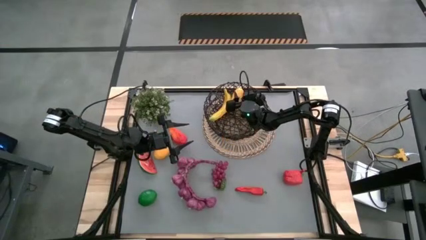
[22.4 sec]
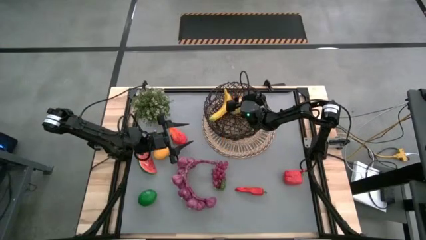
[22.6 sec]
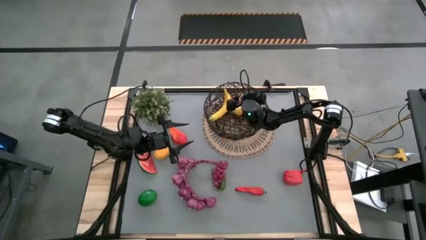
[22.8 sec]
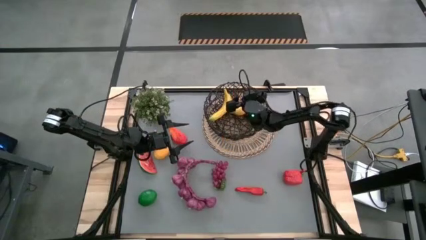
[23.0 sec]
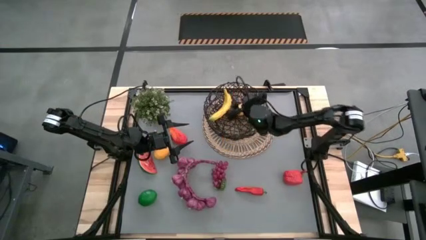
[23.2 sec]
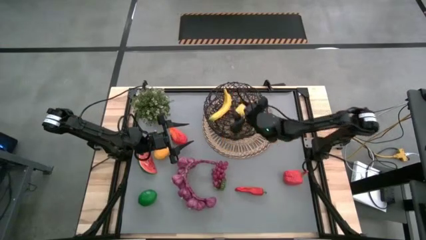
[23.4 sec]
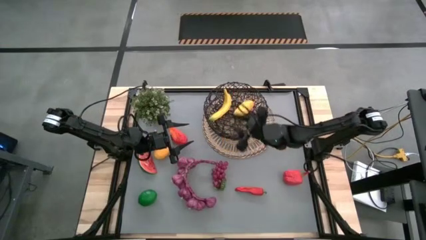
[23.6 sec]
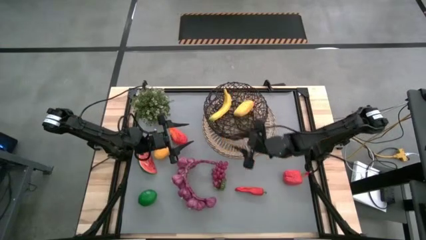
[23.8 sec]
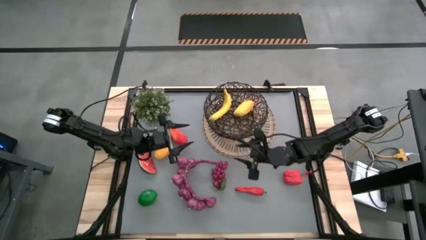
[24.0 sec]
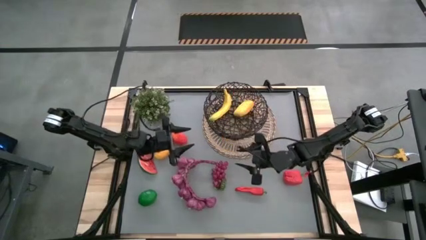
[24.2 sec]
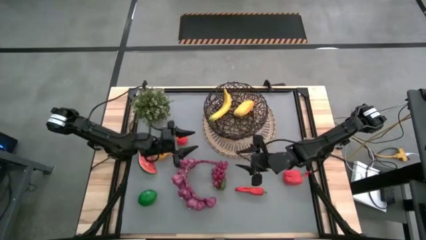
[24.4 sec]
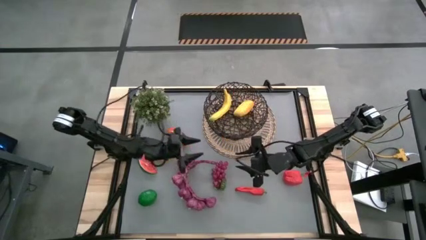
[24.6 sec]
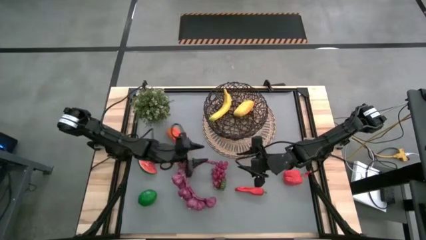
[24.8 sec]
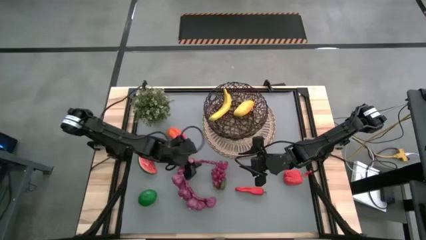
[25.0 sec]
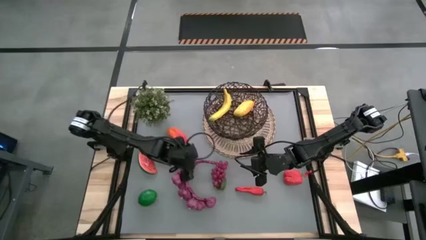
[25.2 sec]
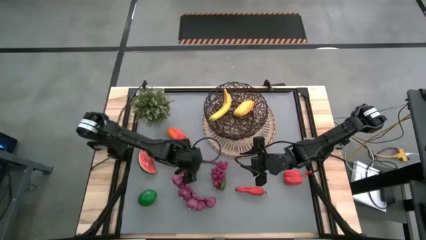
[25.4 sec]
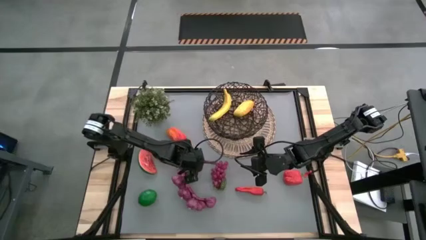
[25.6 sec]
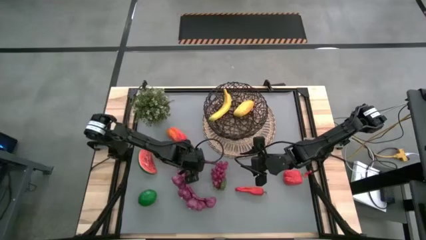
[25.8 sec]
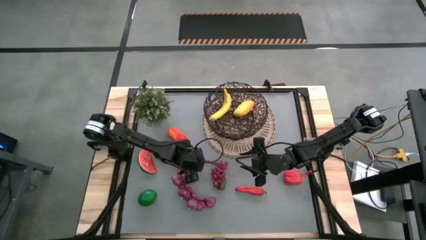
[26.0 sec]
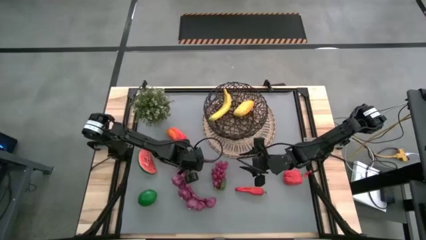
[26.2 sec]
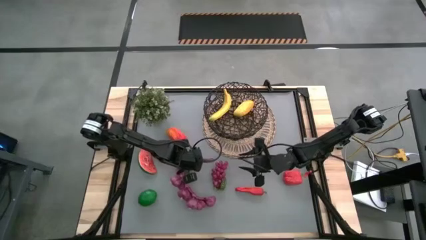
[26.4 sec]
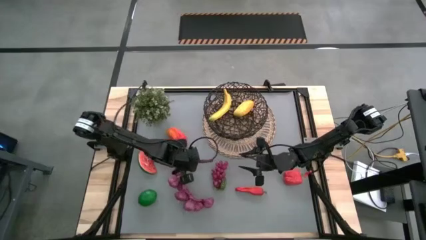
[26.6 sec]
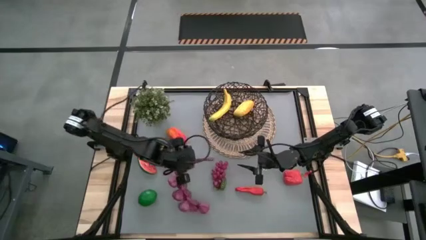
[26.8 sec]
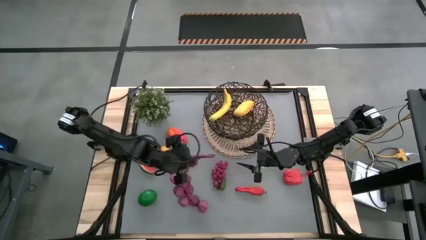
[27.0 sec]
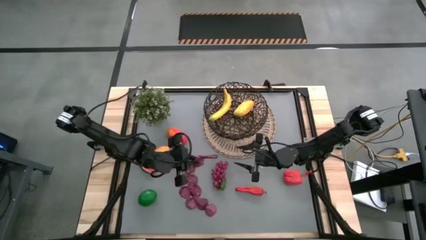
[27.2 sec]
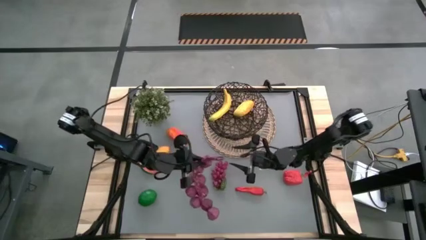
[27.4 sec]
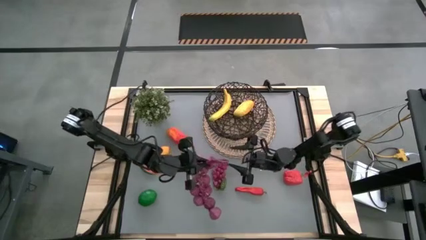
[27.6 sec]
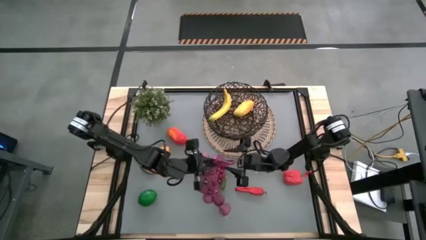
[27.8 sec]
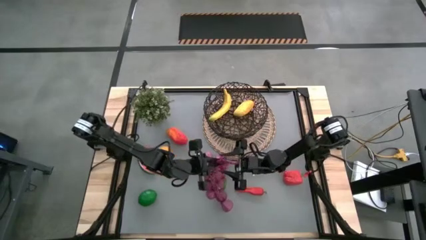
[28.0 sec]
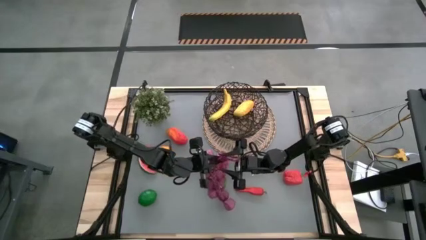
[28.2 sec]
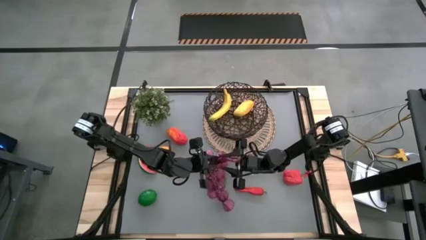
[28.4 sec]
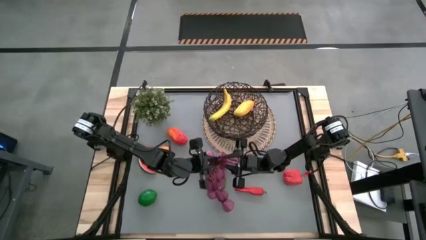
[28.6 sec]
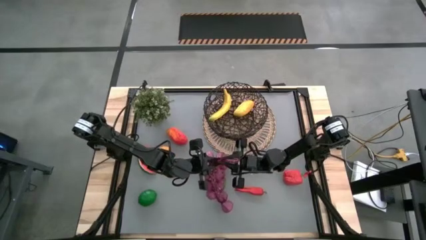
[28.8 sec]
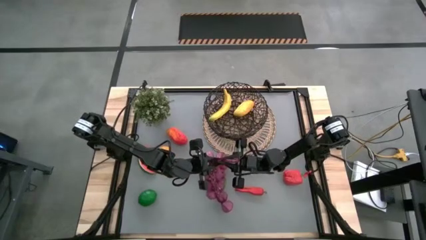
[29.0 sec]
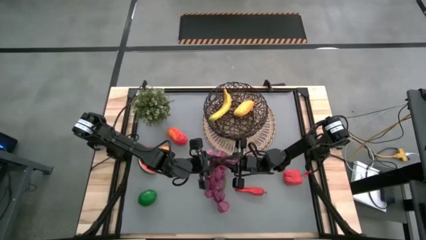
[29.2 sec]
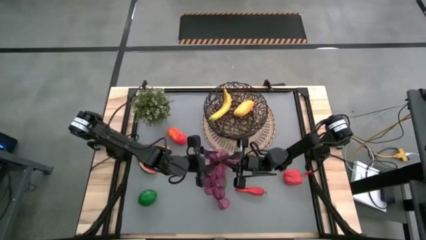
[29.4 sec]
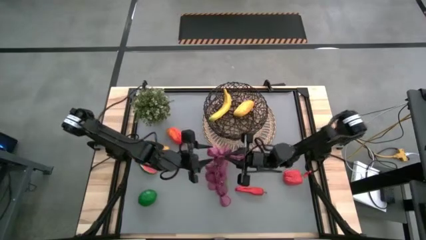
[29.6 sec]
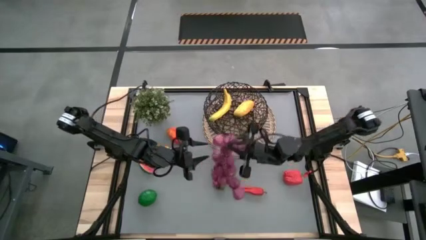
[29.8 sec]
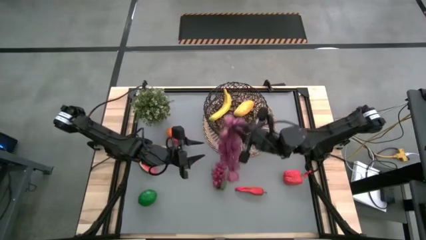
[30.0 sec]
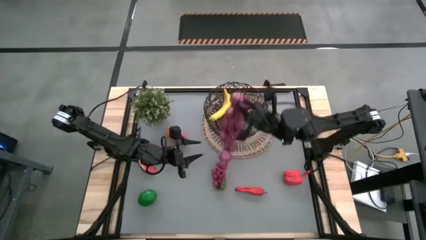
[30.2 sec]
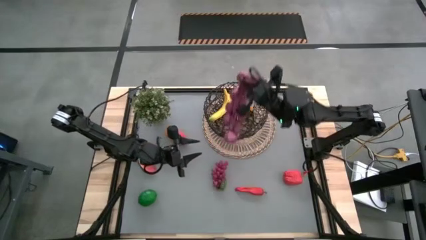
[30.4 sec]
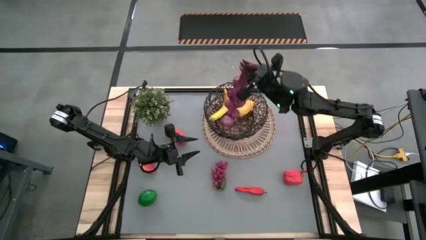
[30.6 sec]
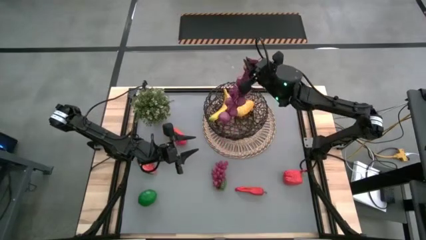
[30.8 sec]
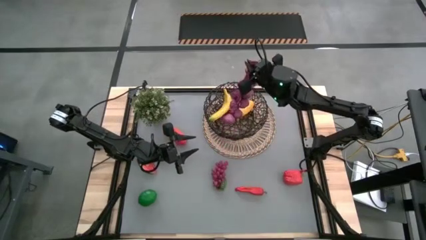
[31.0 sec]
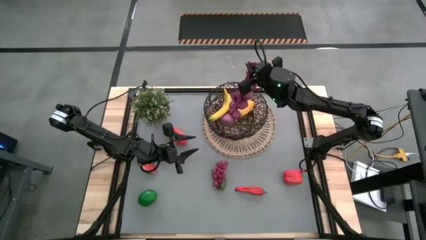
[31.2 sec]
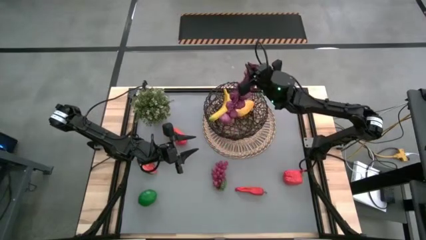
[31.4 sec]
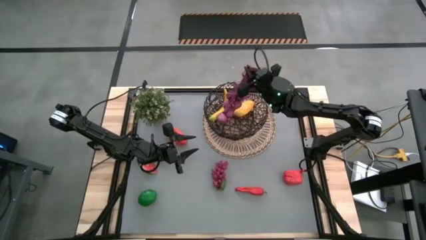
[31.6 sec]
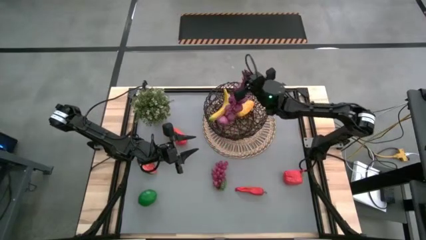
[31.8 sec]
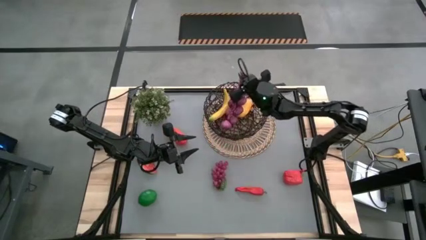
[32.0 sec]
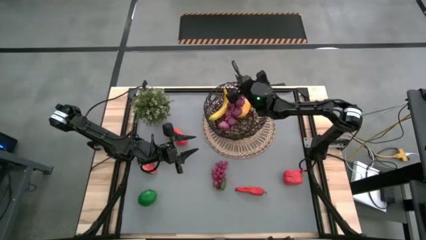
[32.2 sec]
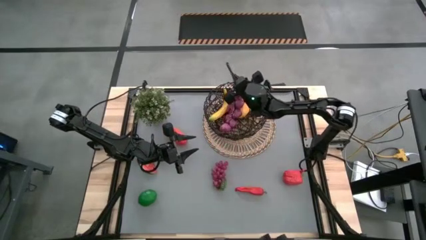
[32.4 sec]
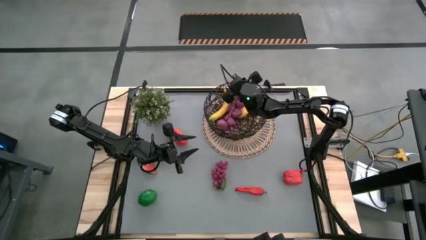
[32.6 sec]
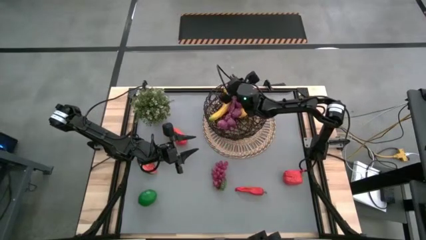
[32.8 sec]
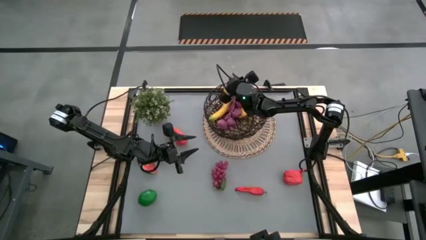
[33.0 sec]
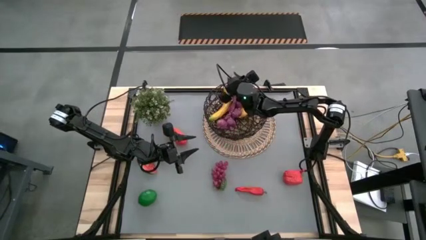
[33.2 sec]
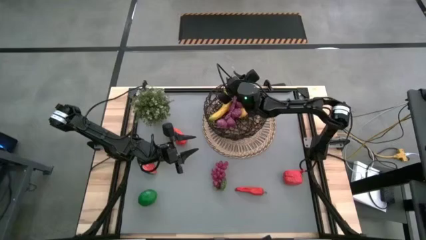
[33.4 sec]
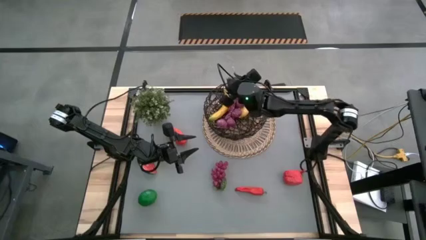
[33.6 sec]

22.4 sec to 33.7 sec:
Task: Build produce basket
Put the purple garlic into the black wire basket
